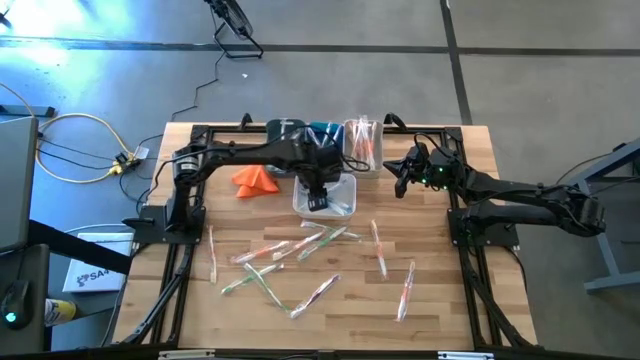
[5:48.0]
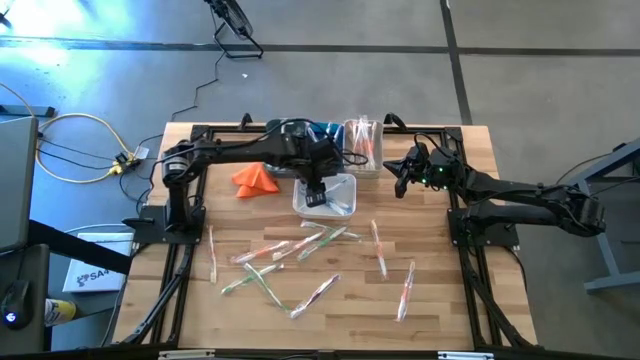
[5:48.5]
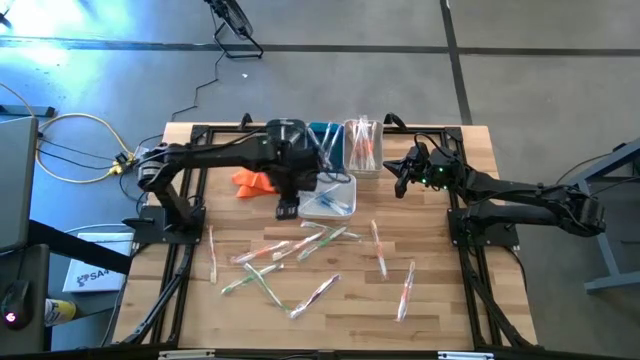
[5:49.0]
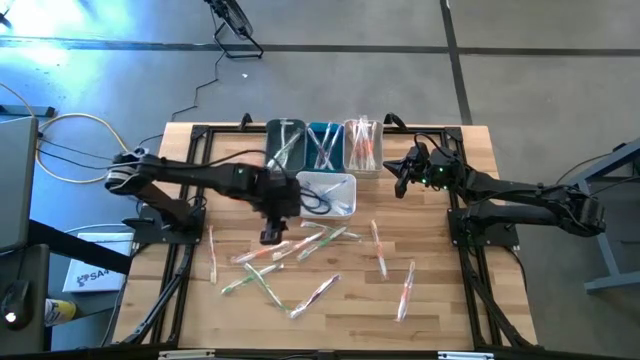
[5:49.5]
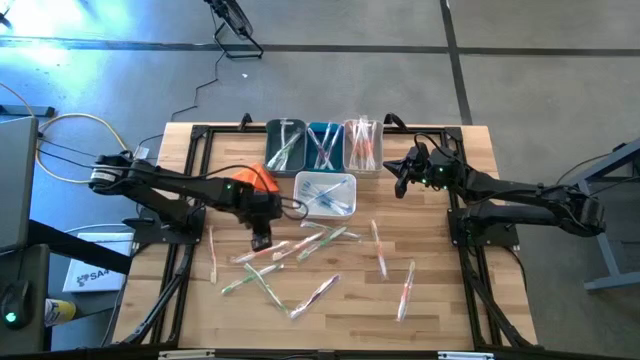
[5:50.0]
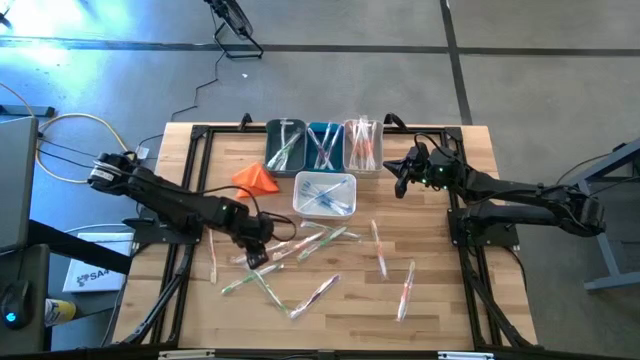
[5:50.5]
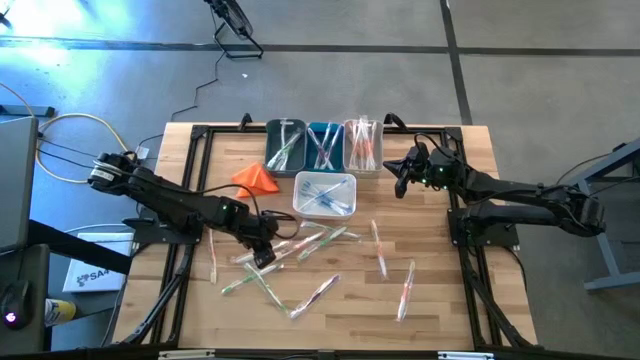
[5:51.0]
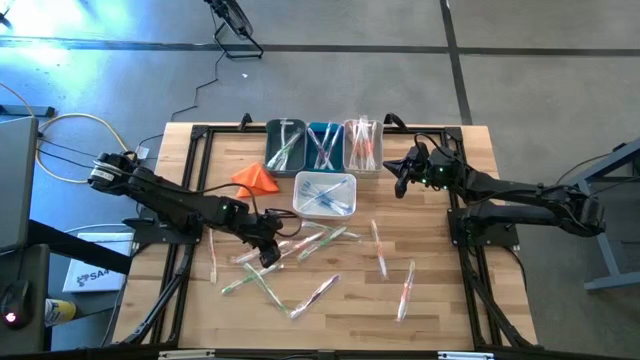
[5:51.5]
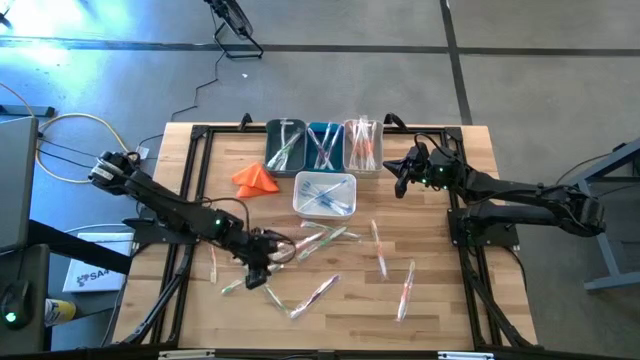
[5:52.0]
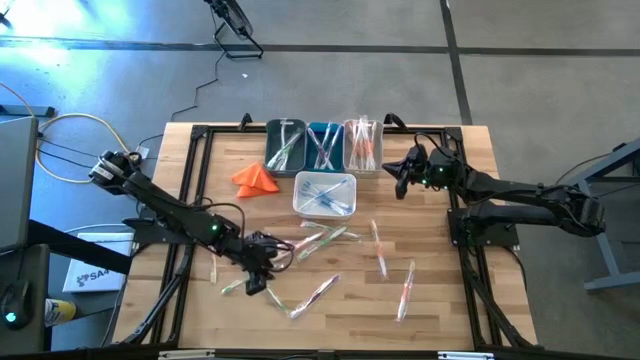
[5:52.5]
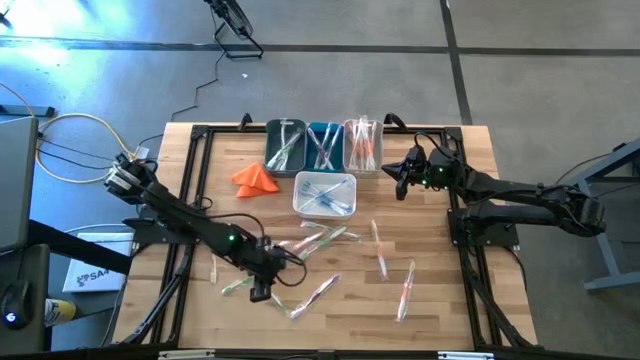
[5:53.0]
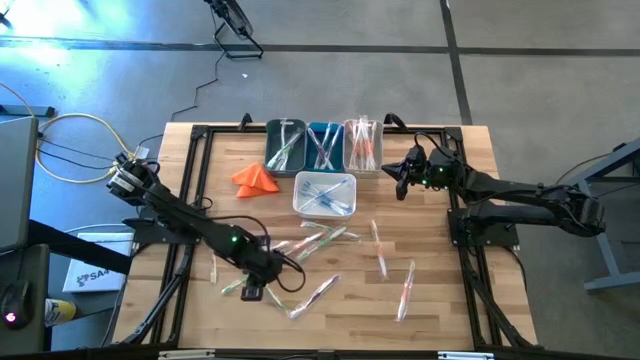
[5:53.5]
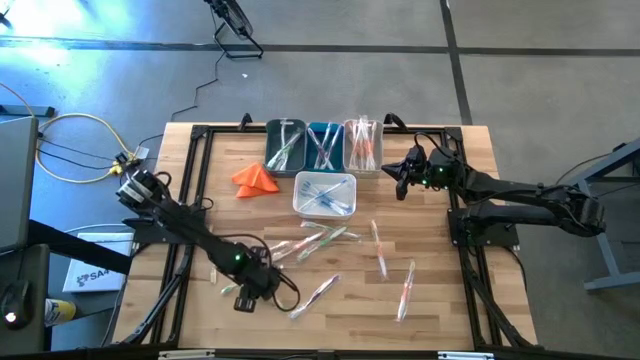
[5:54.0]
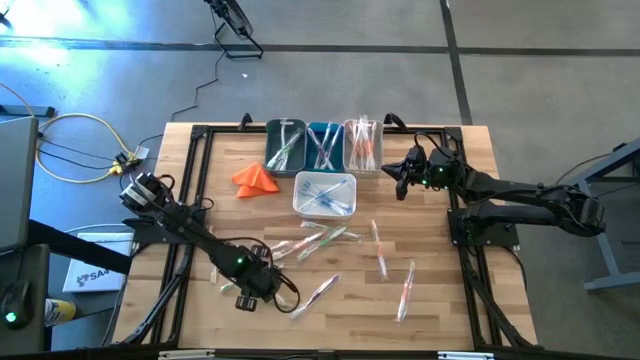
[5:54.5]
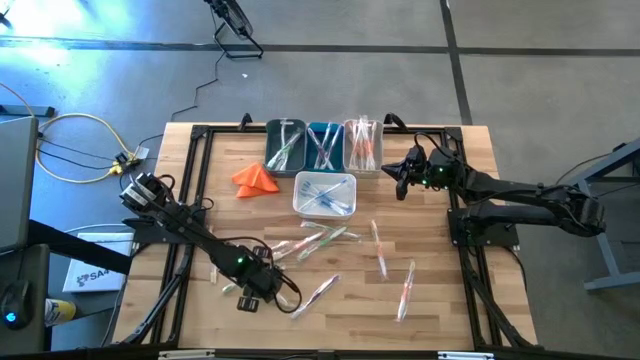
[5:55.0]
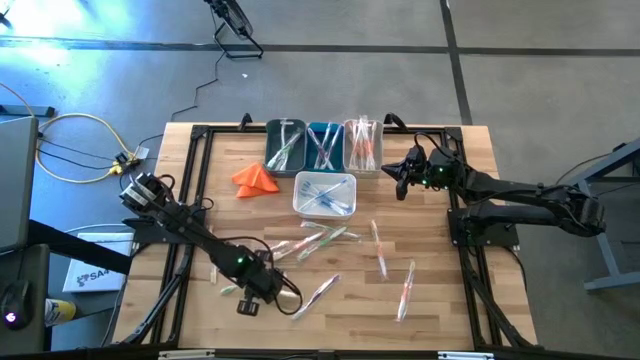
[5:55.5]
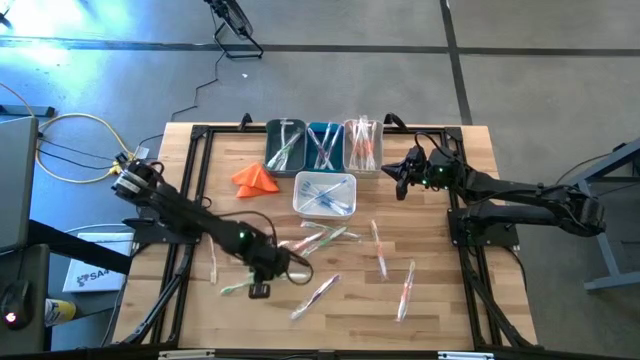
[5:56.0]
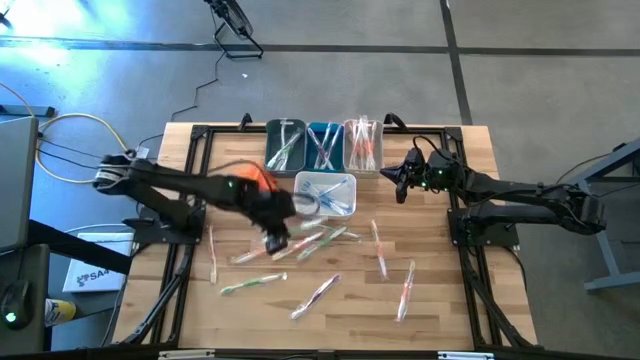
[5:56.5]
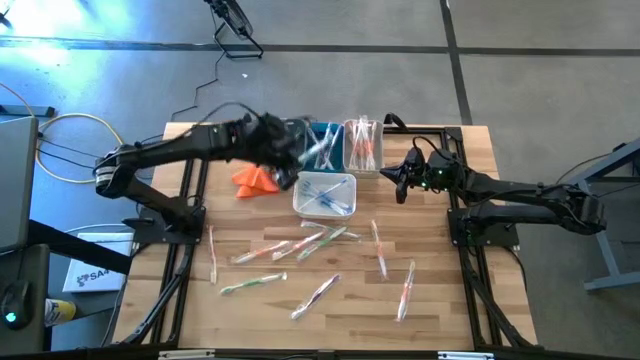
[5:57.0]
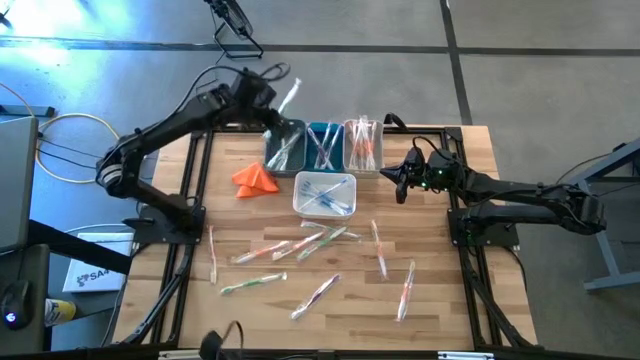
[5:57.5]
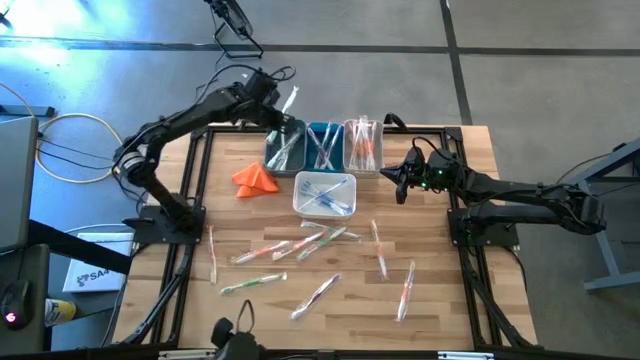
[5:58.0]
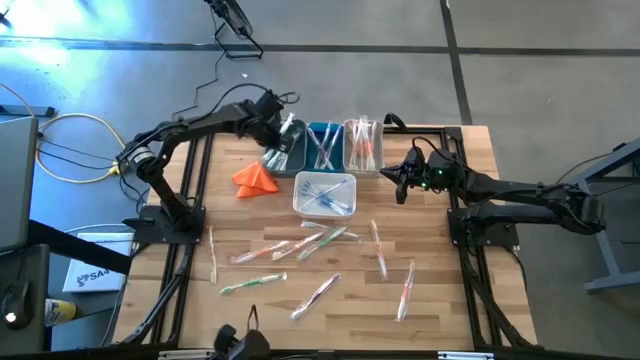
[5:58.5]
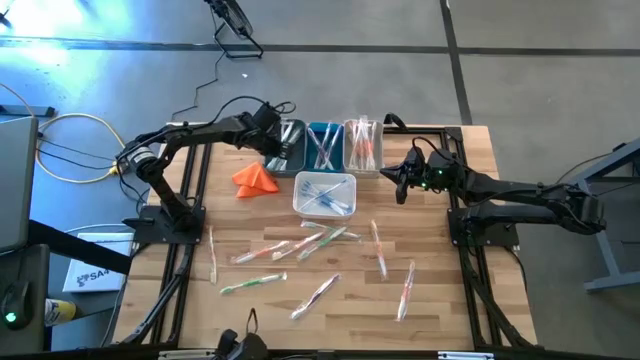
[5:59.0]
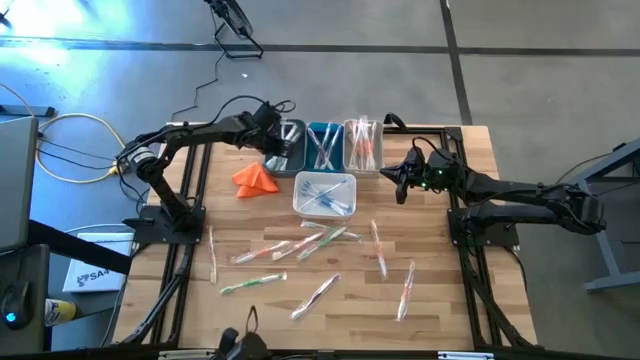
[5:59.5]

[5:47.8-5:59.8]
Task: Pick & Place Toothbrushes
Put the green toothbrush into the dark blue bin

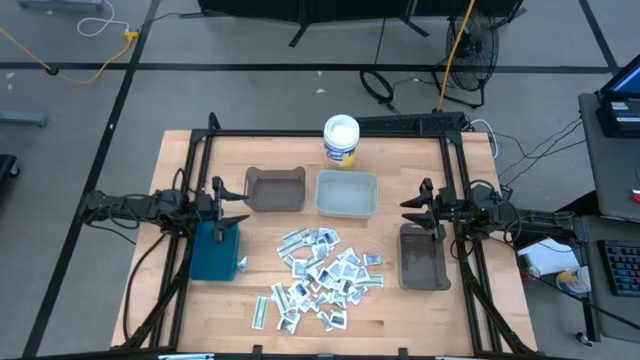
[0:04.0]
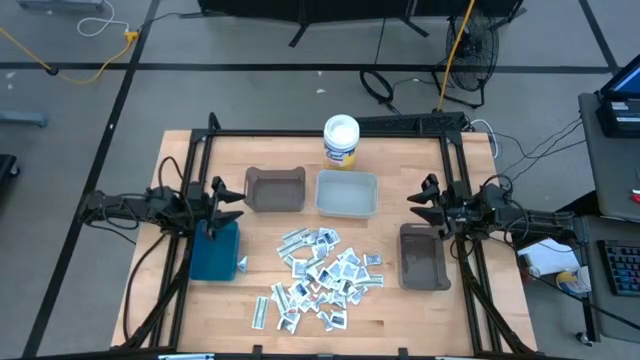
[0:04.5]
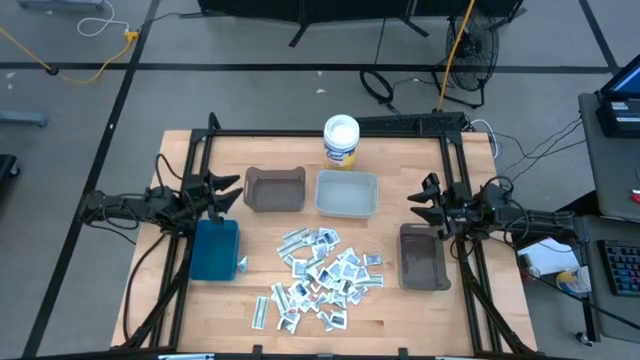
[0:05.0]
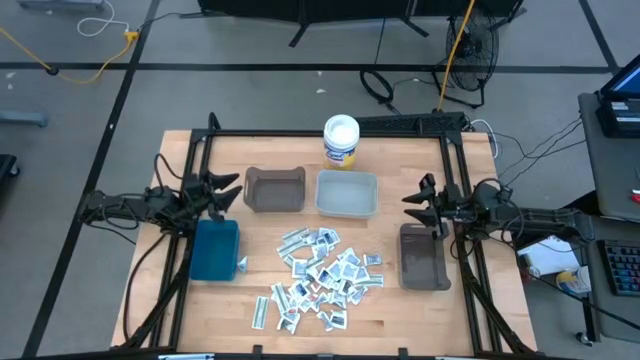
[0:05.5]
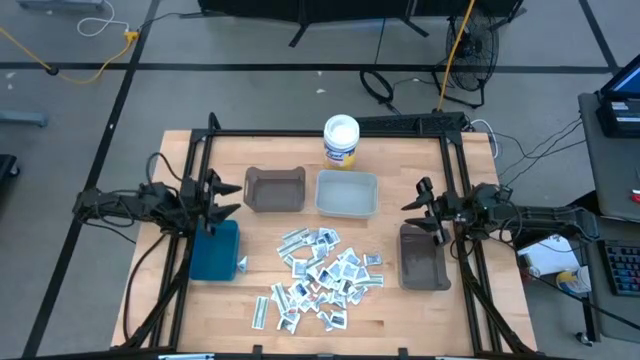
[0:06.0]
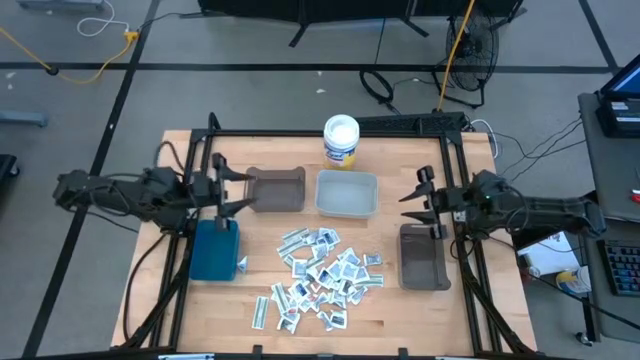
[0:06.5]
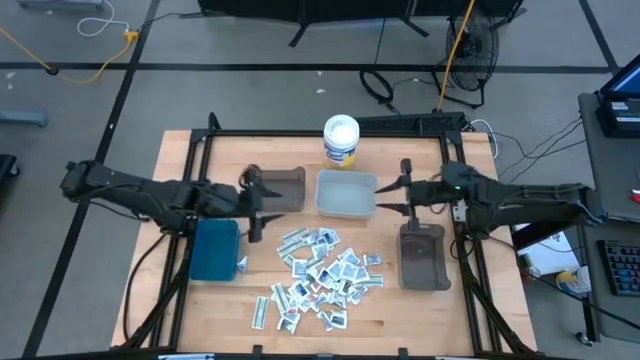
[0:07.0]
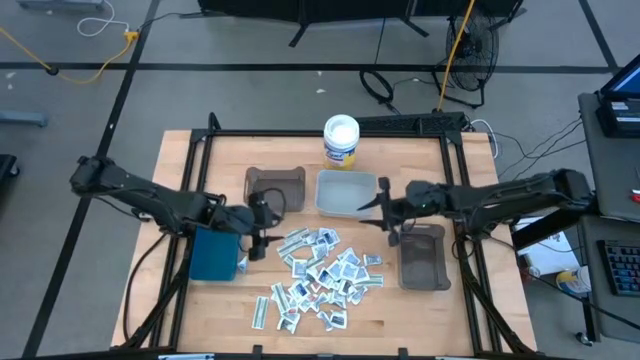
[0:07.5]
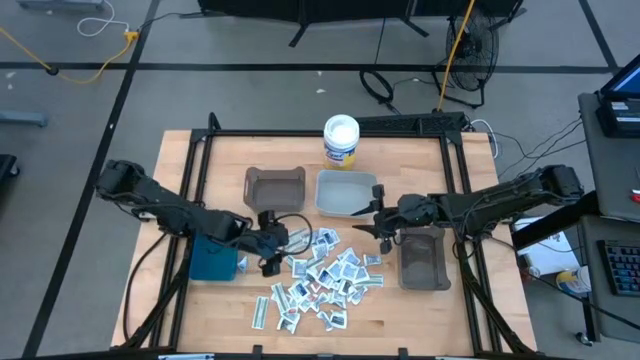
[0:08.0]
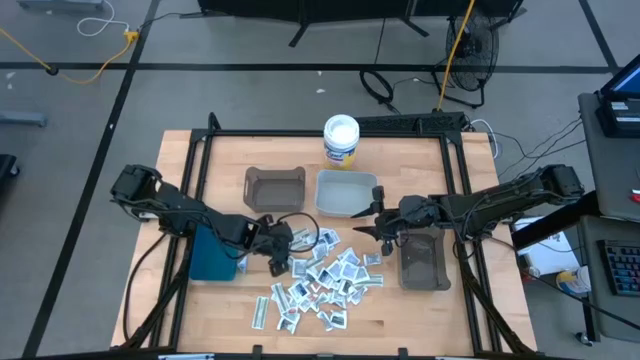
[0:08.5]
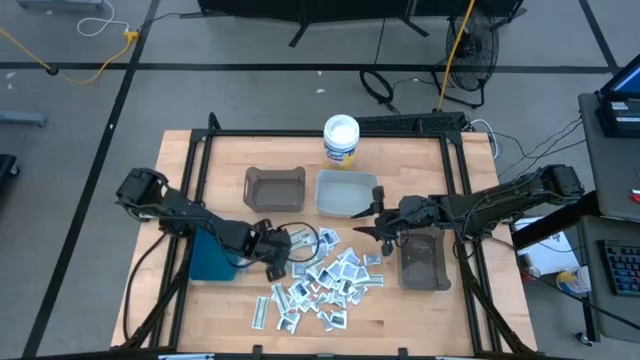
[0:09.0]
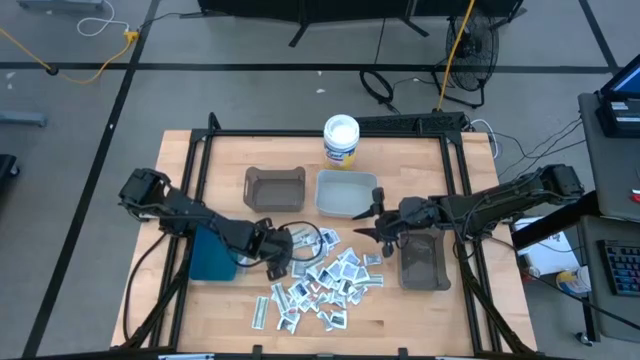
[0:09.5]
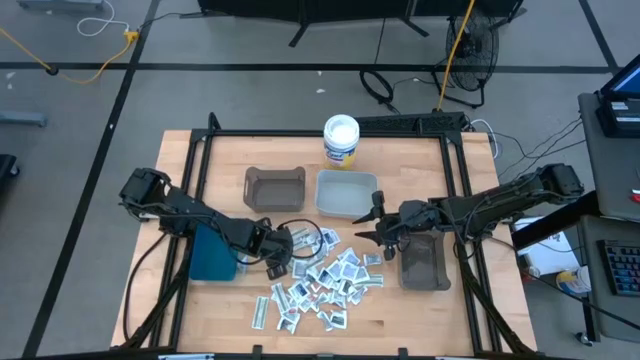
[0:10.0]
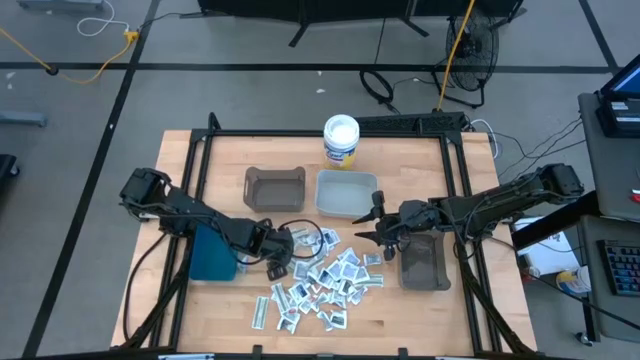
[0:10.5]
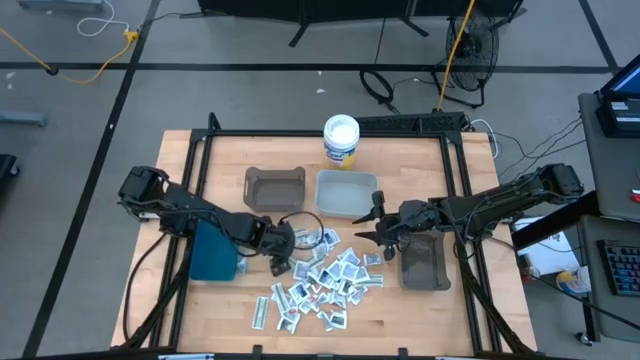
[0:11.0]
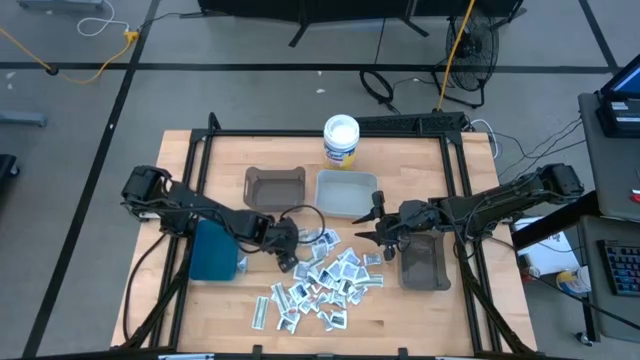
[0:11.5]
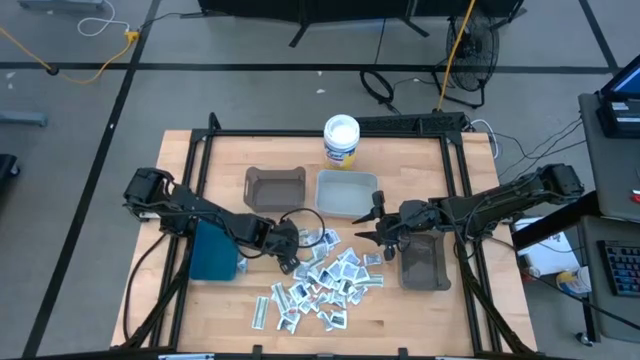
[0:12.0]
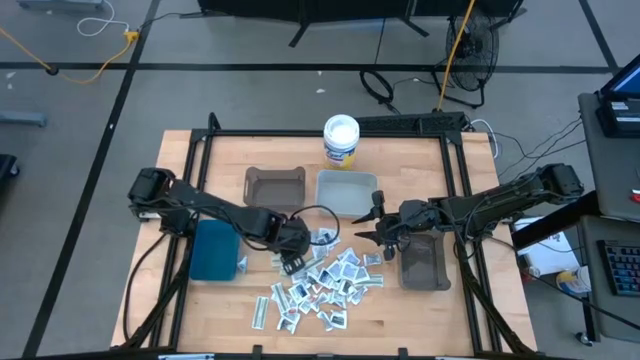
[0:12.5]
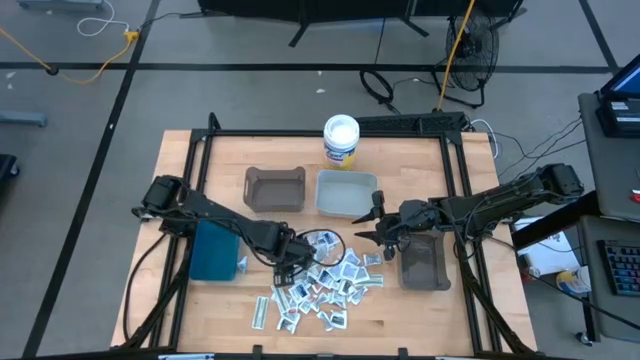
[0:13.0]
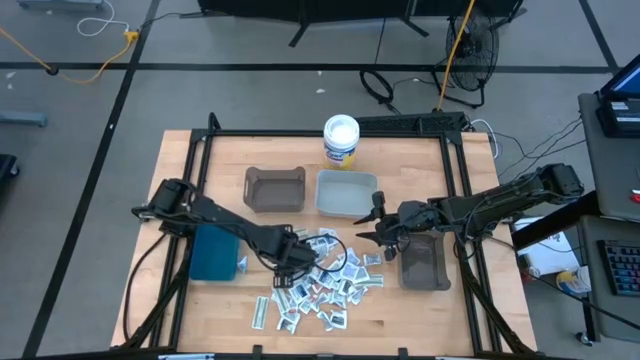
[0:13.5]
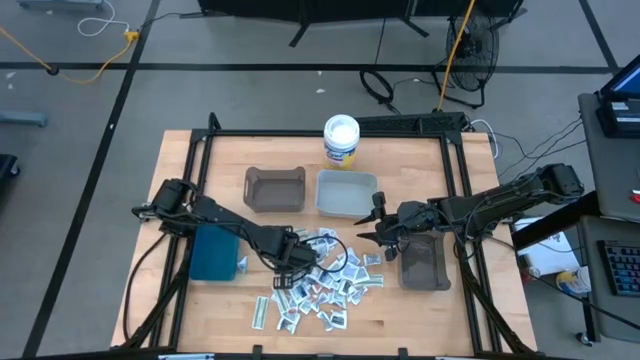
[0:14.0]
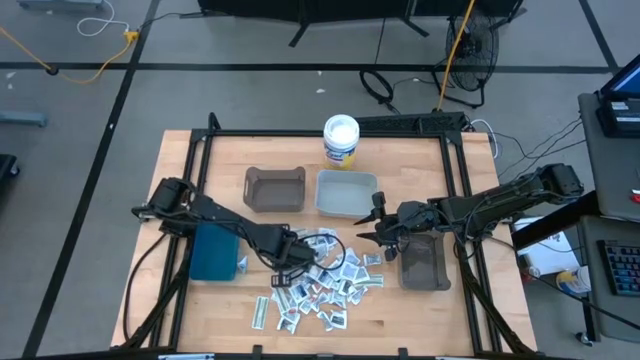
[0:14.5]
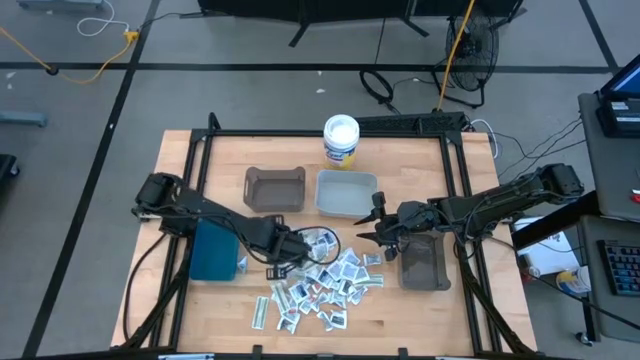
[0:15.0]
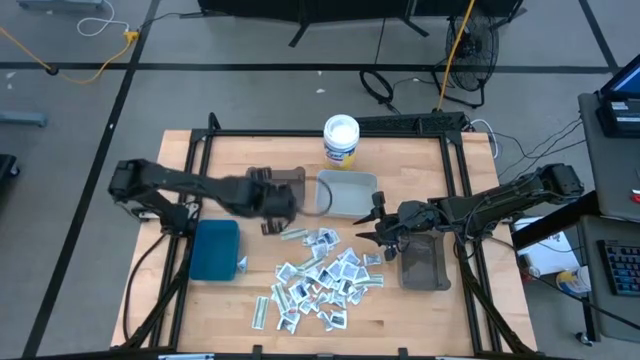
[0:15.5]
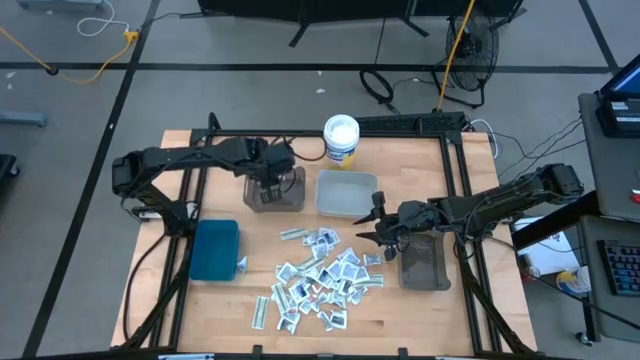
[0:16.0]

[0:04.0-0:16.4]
Task: Pick & Place First Aid Supplies
Put the green bandage pack into the top black bin
